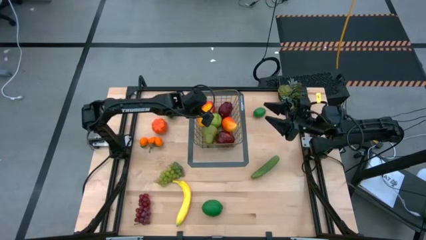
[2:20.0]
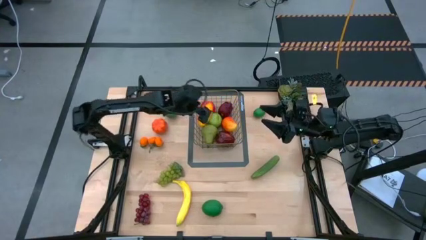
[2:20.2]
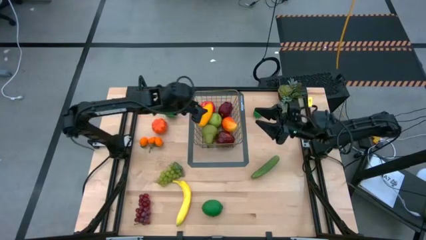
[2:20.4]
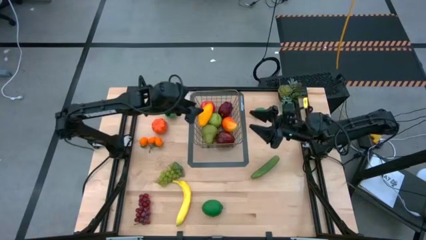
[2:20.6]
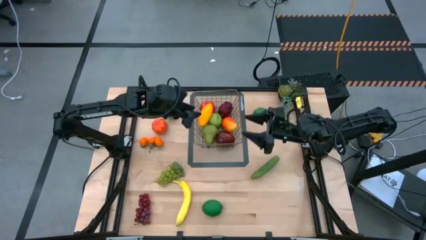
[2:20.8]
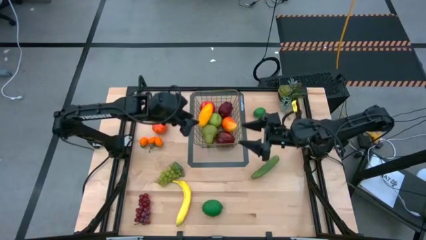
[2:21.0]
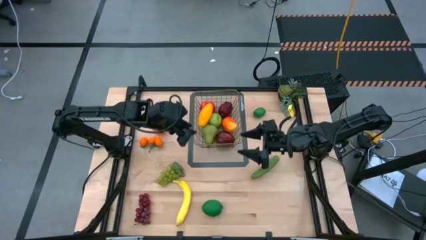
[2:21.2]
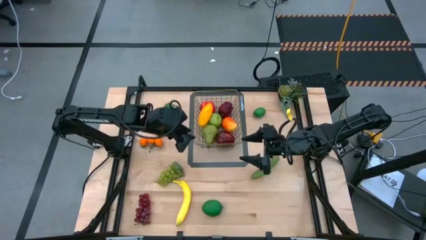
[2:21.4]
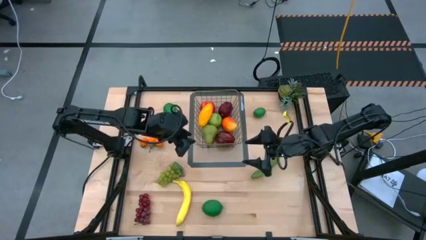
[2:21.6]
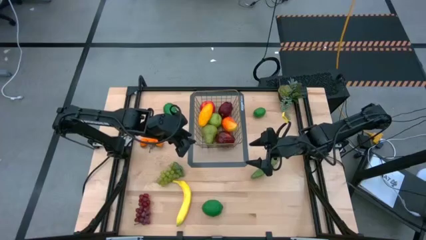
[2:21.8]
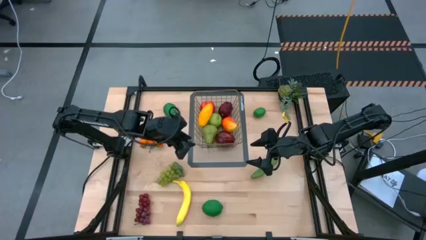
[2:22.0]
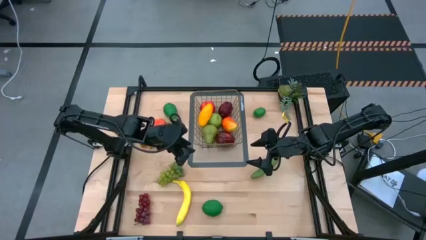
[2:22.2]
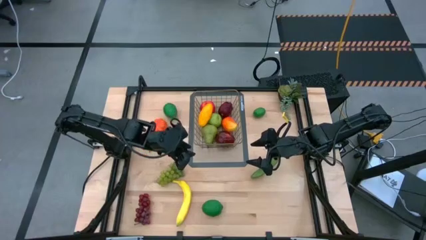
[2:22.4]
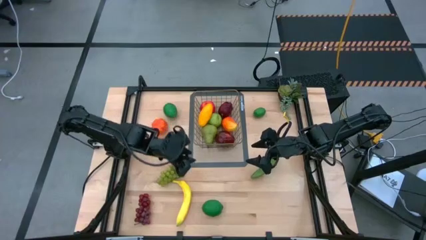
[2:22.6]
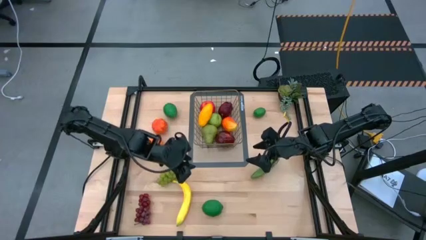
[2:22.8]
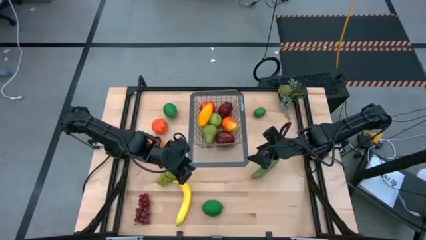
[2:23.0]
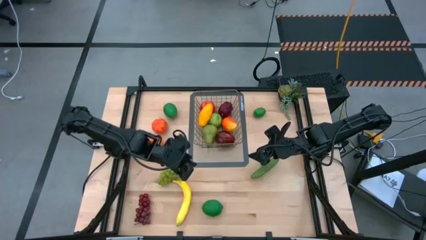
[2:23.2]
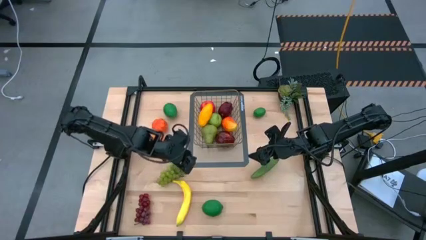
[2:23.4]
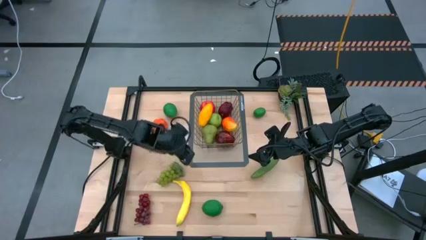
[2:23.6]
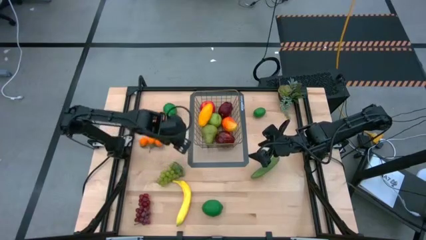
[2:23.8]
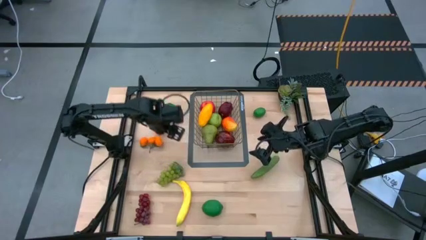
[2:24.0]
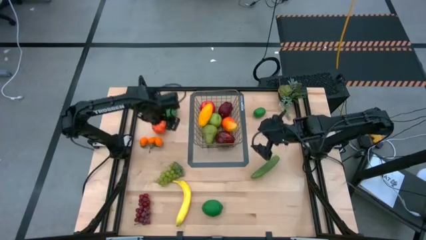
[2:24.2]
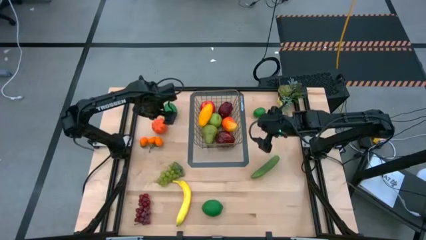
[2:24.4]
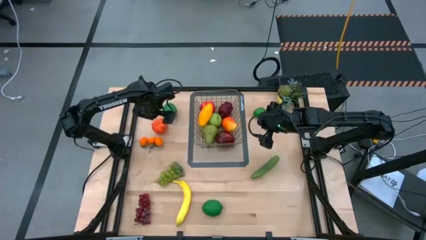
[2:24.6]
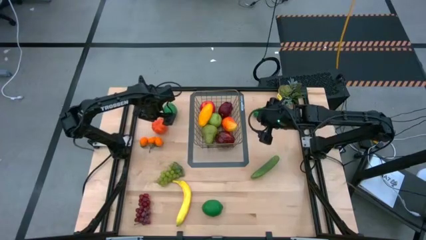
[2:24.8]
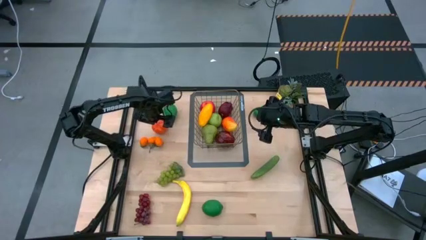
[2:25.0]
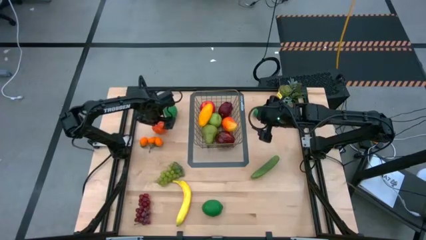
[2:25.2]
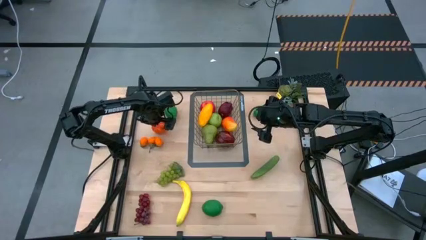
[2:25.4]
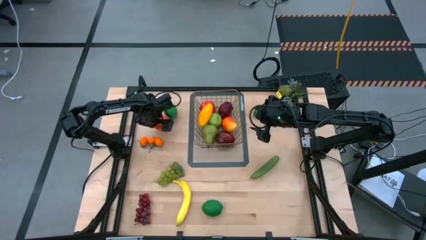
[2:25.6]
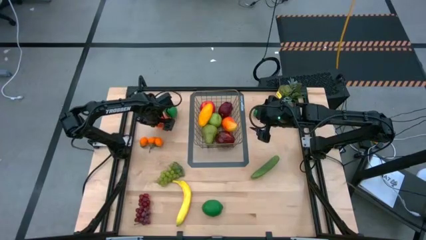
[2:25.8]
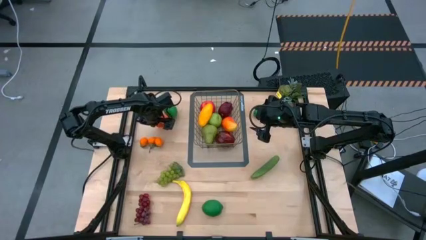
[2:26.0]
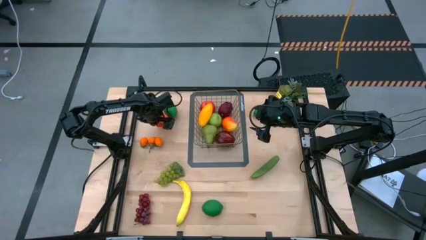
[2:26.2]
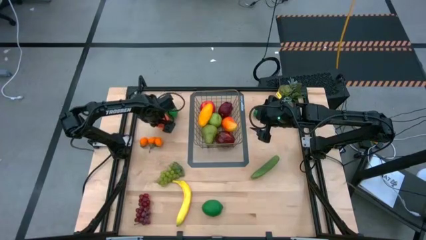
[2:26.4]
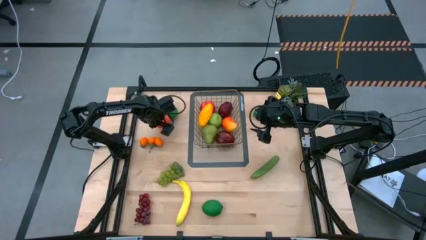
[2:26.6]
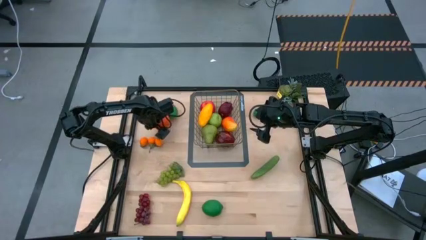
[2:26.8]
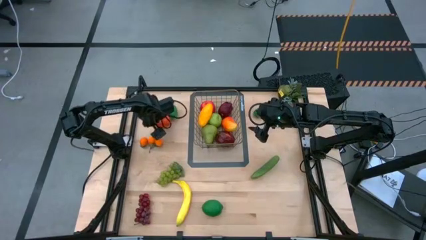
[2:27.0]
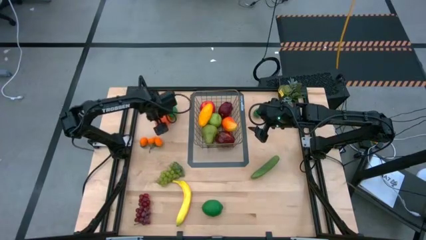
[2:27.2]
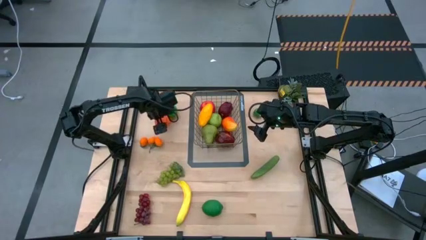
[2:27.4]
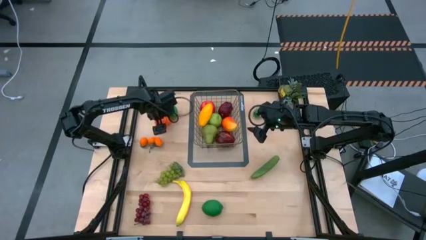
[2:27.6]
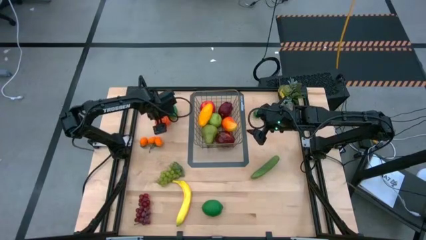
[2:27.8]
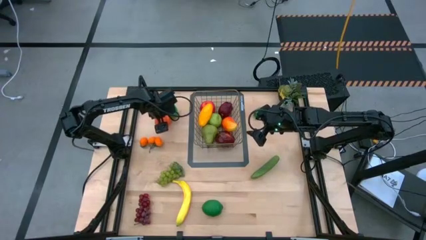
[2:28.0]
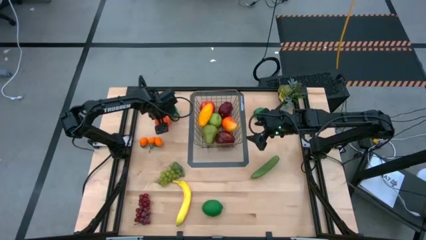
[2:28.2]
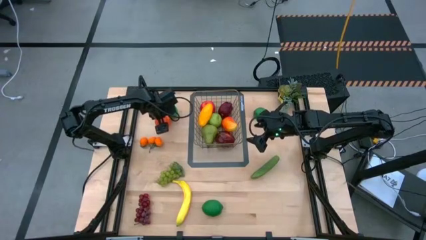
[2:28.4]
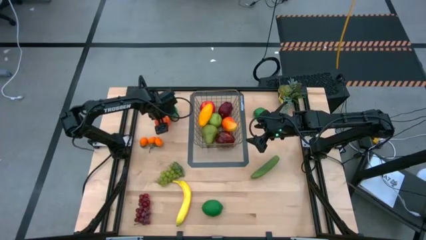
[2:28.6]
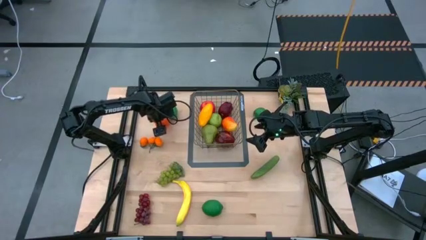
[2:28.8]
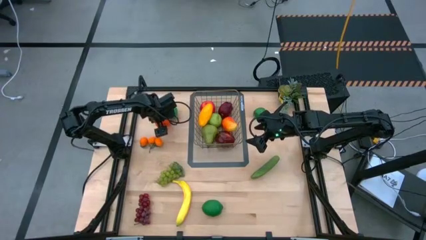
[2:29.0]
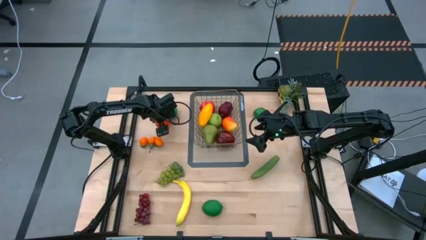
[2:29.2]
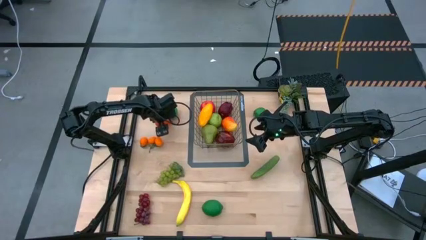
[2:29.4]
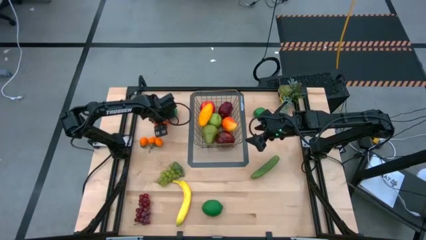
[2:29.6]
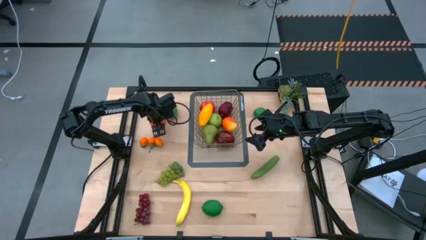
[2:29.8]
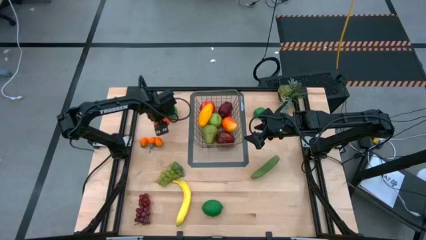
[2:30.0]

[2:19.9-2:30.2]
Task: Build produce basket
Put the orange pumpkin into the gold wire basket

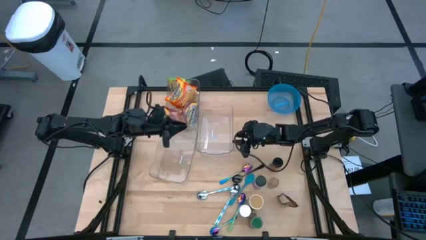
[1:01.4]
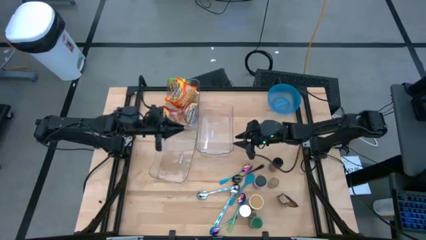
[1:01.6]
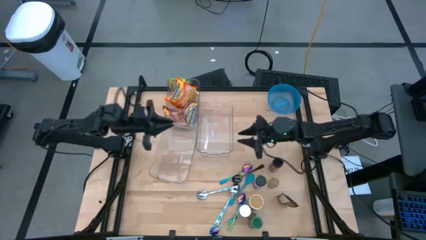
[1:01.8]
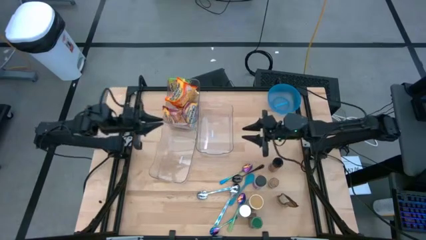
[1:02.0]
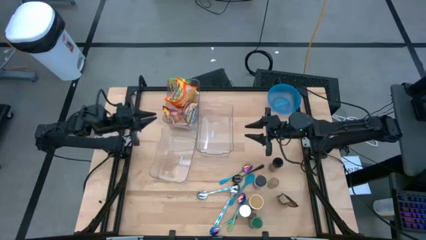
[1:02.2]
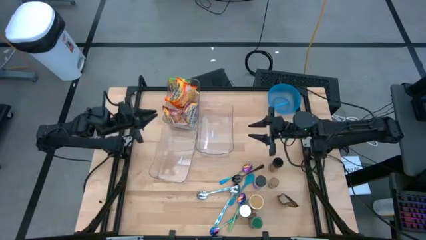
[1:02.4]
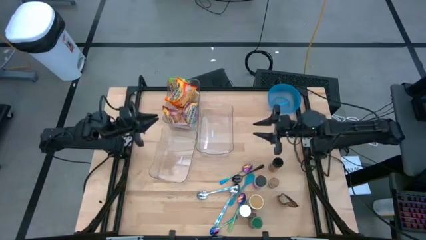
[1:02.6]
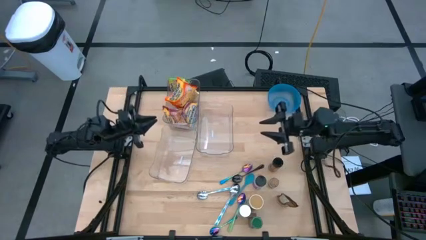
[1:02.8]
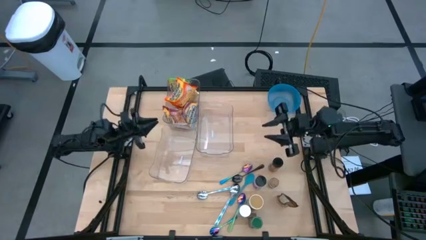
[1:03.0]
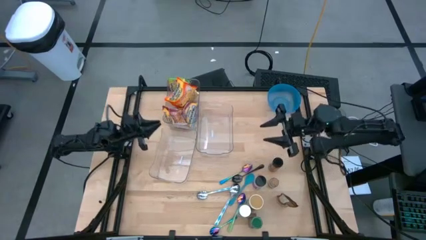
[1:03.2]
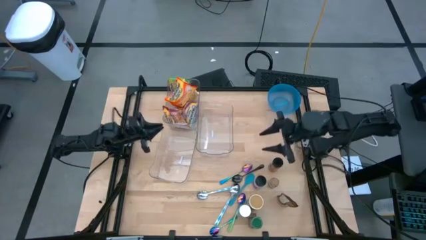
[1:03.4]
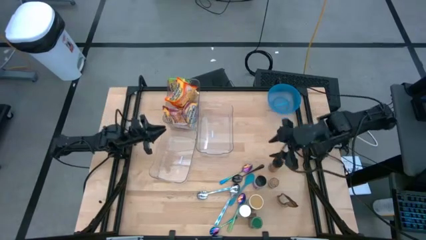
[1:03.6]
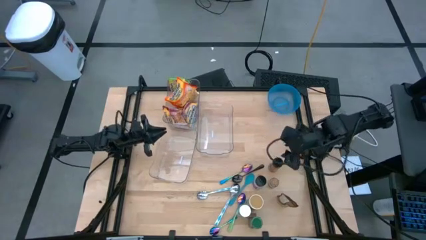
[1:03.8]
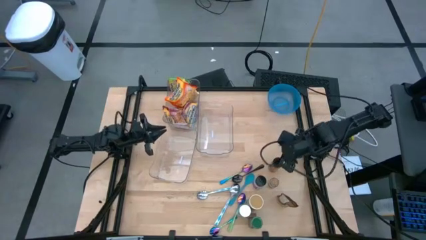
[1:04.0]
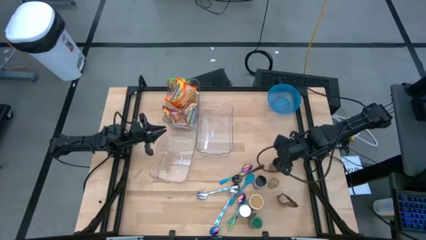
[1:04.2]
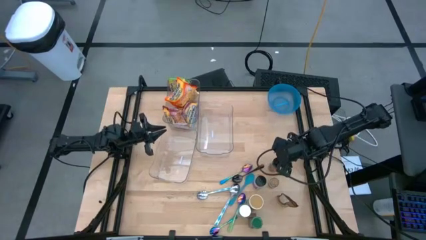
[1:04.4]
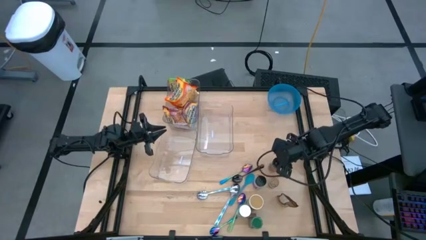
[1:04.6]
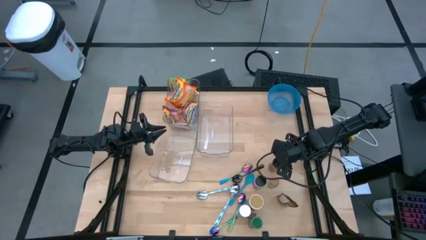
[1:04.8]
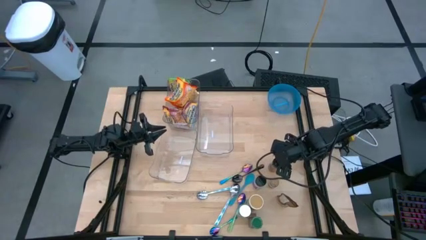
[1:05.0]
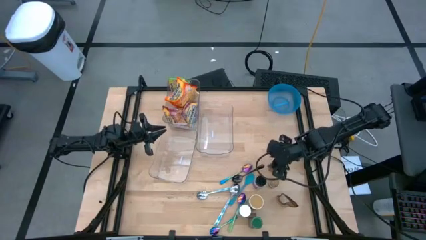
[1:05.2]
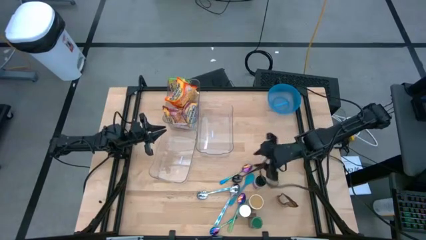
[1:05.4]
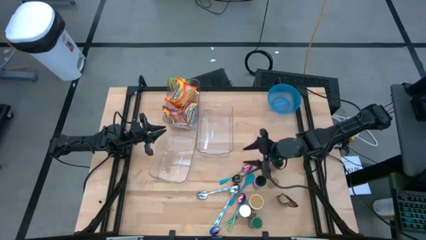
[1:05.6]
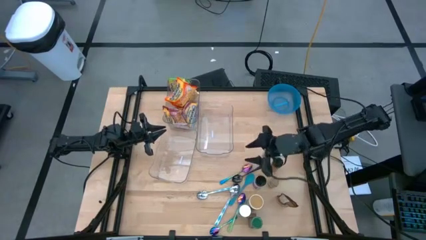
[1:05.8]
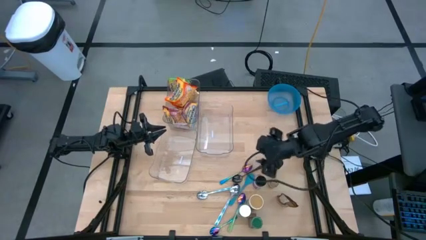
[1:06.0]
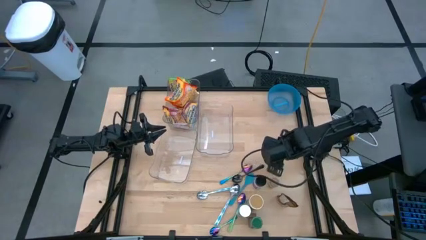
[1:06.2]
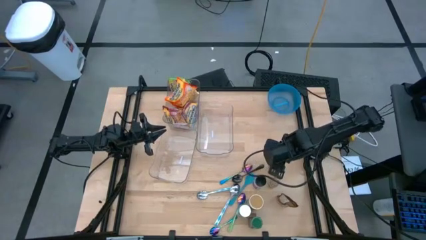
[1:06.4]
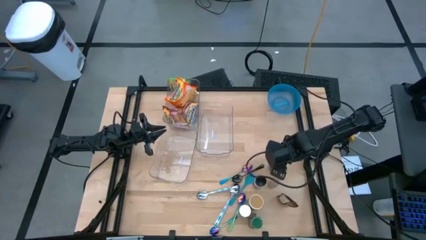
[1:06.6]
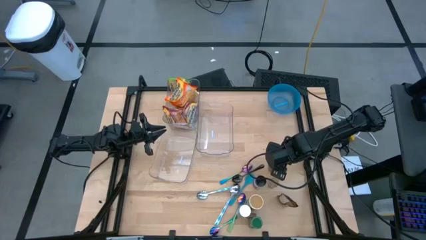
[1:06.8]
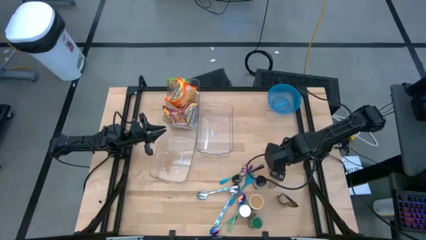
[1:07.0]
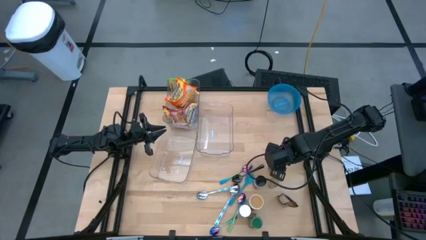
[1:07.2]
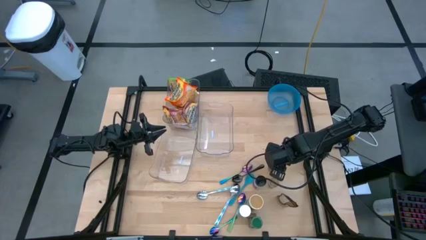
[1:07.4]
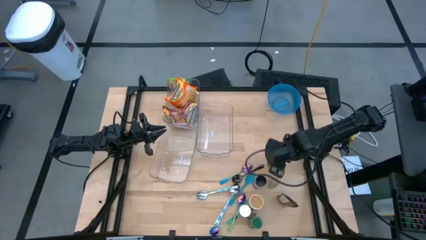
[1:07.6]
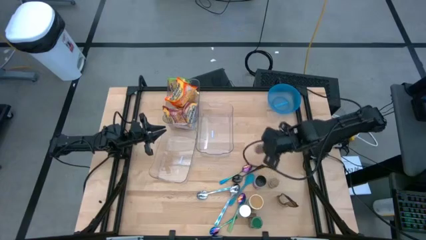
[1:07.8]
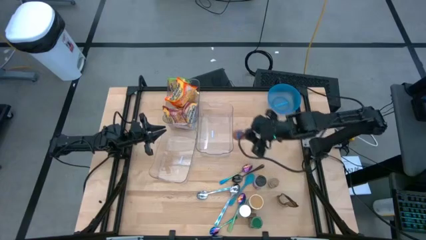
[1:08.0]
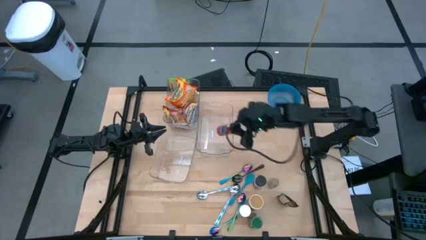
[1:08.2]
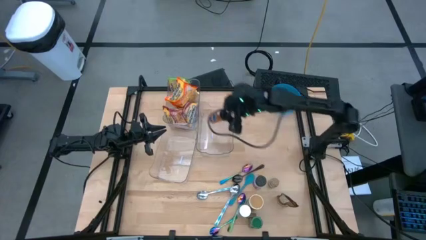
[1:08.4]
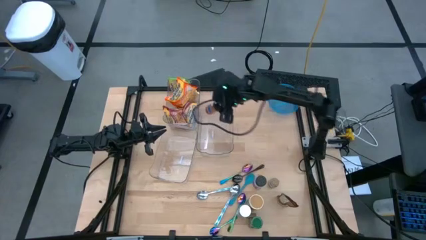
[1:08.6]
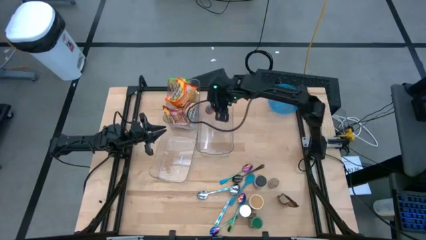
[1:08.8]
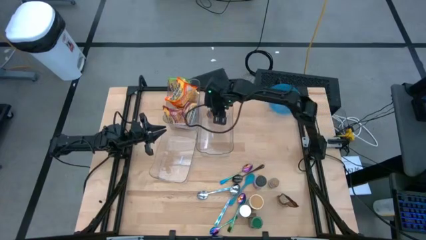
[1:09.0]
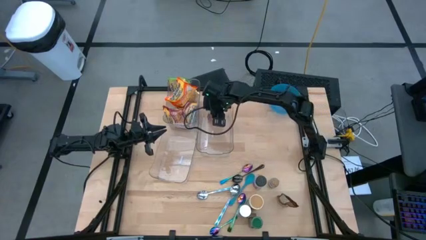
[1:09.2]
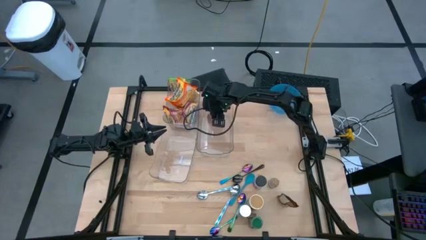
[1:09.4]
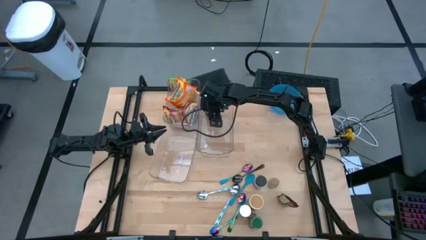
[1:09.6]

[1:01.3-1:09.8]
Task: Pick & Place Food Item
Put the orange spice bottle into the middle transparent bin
